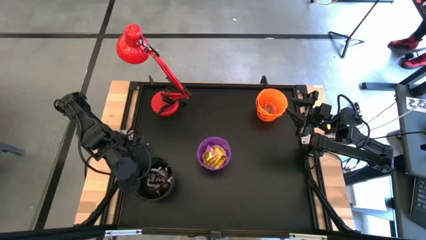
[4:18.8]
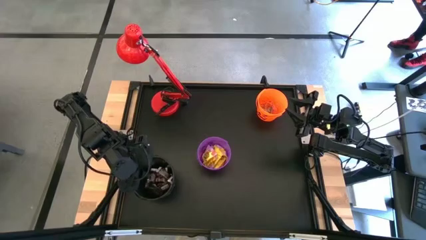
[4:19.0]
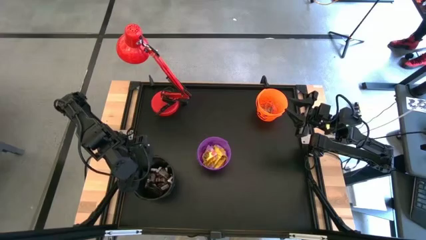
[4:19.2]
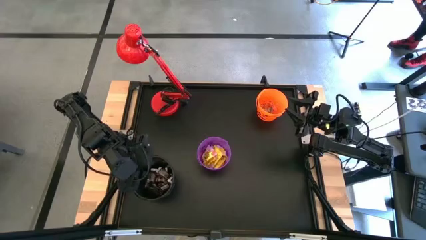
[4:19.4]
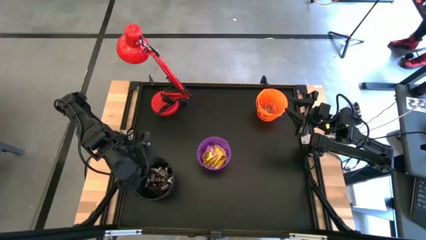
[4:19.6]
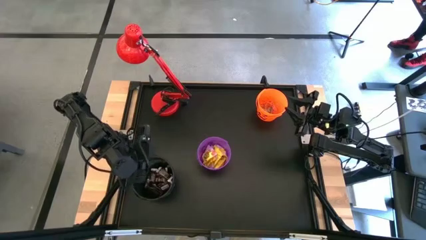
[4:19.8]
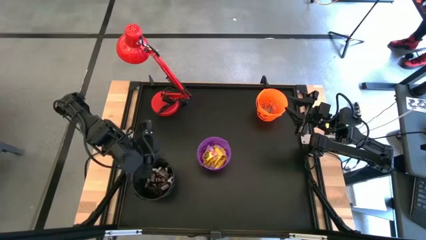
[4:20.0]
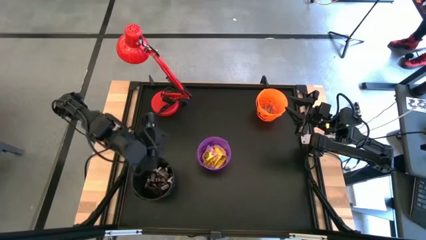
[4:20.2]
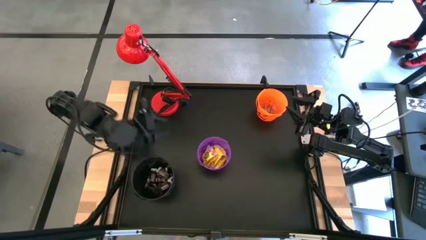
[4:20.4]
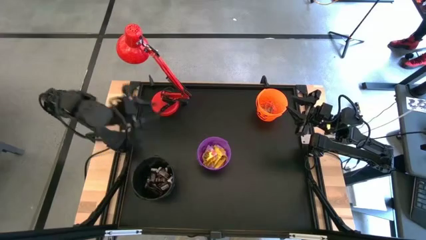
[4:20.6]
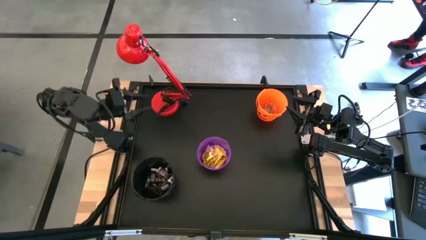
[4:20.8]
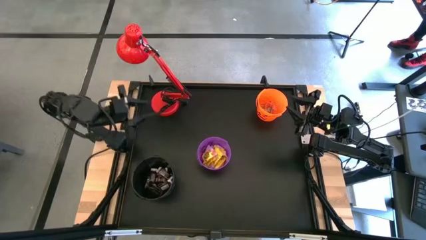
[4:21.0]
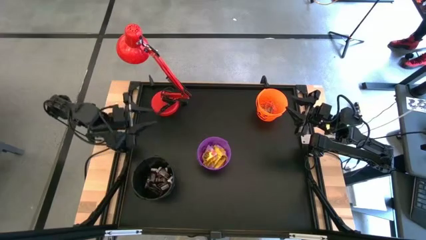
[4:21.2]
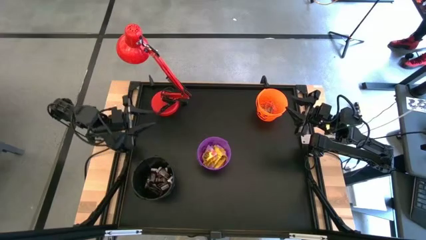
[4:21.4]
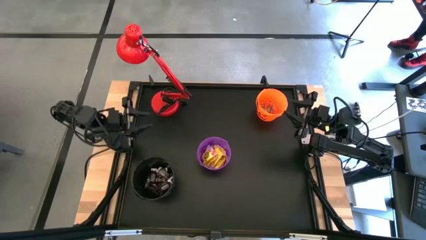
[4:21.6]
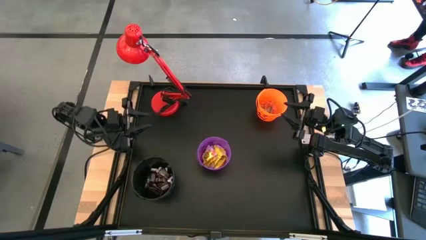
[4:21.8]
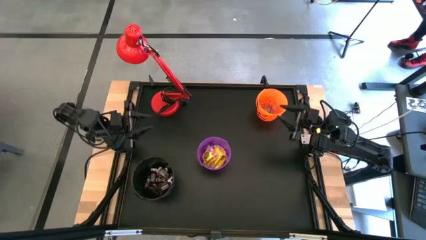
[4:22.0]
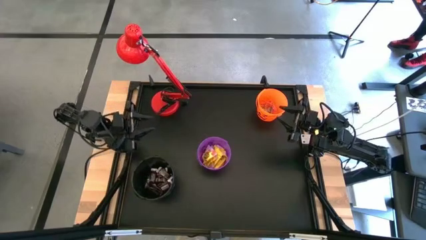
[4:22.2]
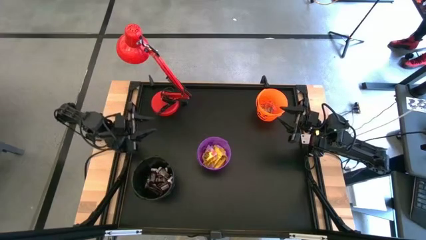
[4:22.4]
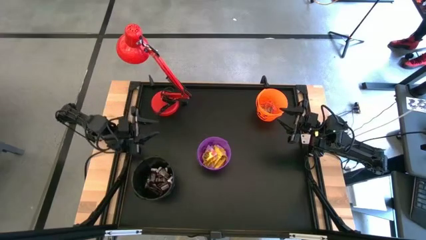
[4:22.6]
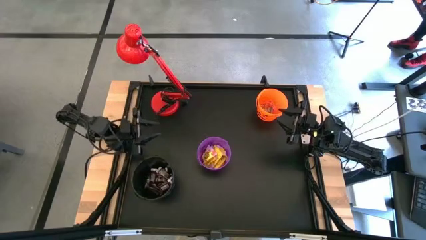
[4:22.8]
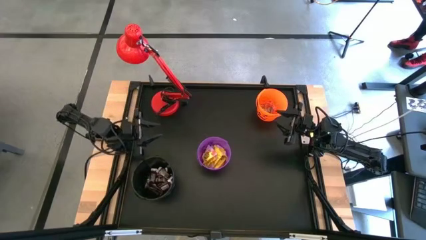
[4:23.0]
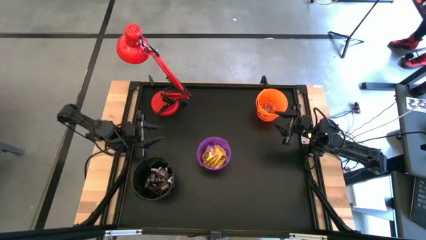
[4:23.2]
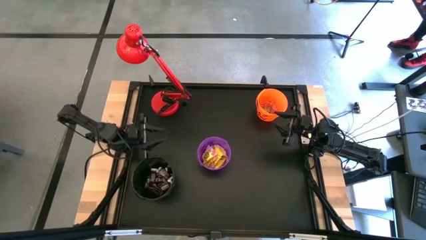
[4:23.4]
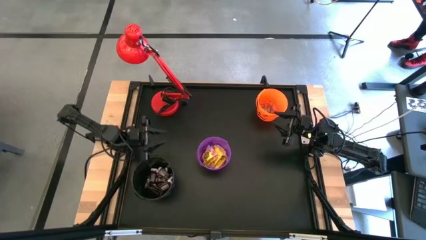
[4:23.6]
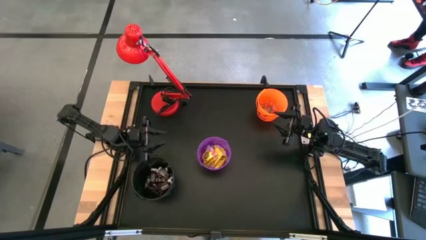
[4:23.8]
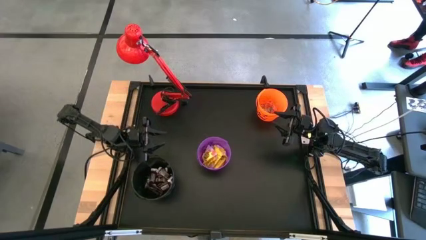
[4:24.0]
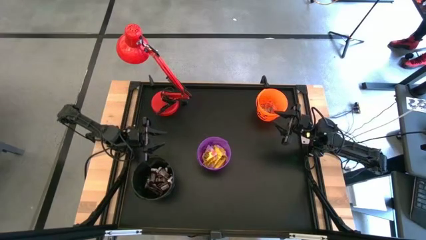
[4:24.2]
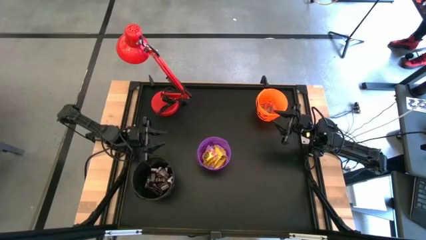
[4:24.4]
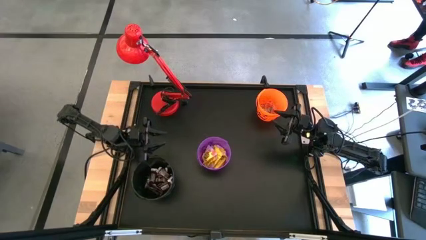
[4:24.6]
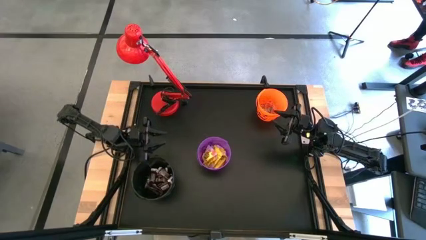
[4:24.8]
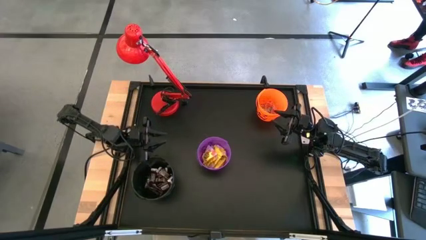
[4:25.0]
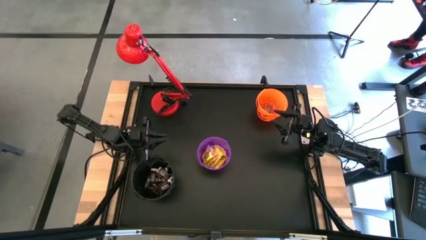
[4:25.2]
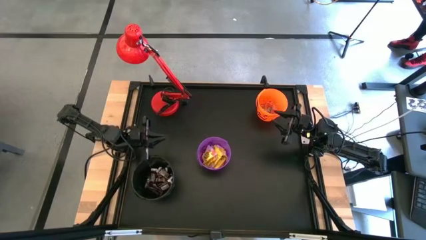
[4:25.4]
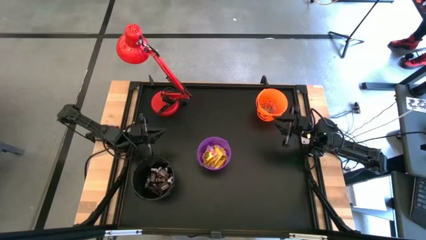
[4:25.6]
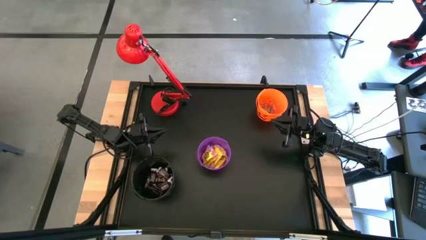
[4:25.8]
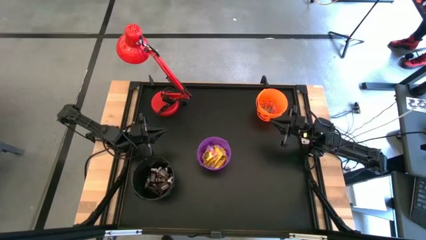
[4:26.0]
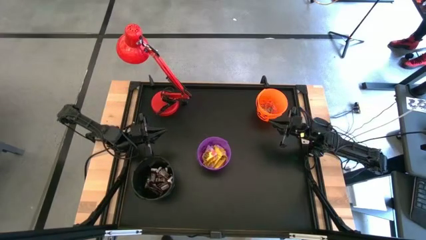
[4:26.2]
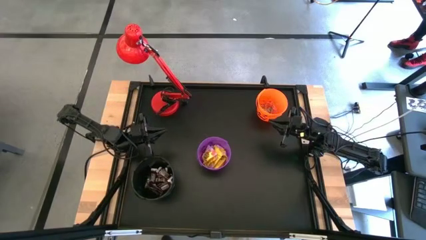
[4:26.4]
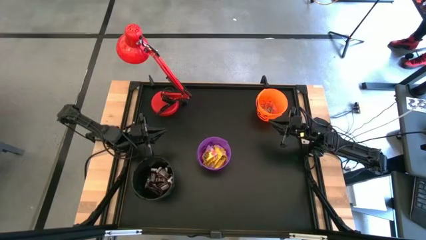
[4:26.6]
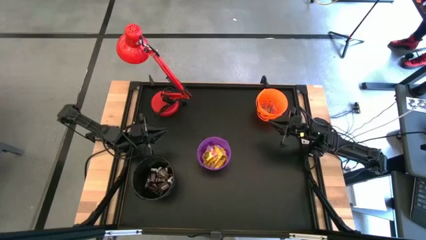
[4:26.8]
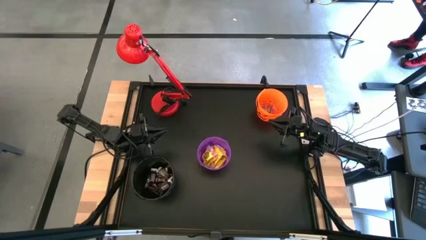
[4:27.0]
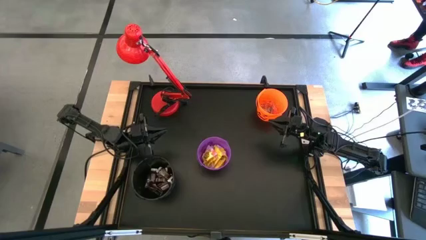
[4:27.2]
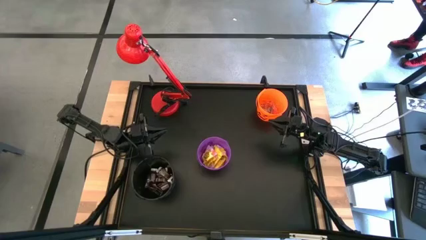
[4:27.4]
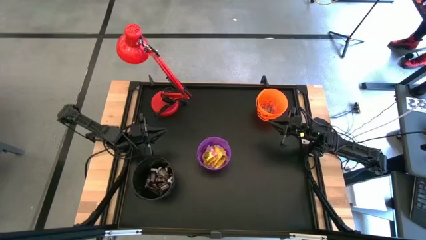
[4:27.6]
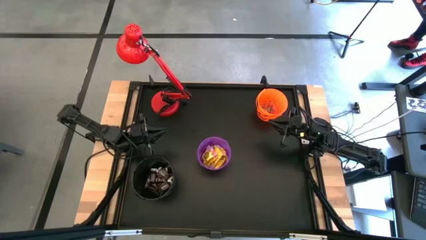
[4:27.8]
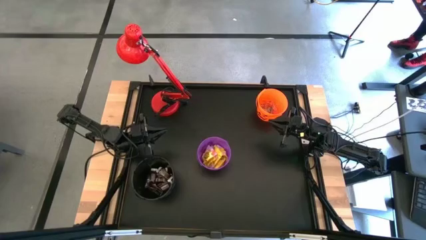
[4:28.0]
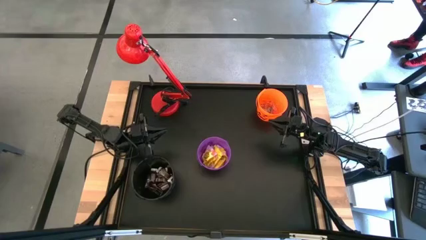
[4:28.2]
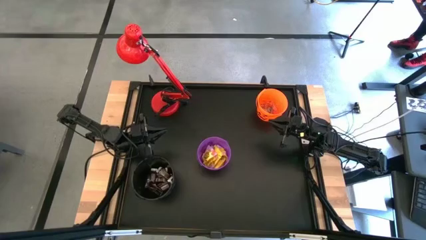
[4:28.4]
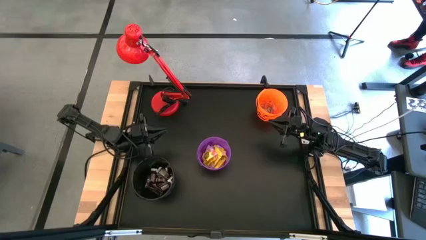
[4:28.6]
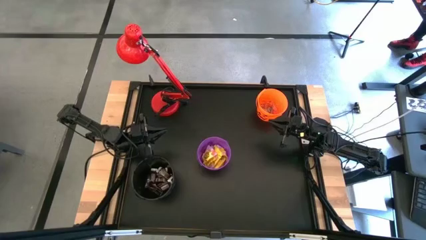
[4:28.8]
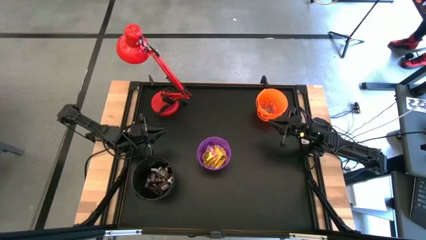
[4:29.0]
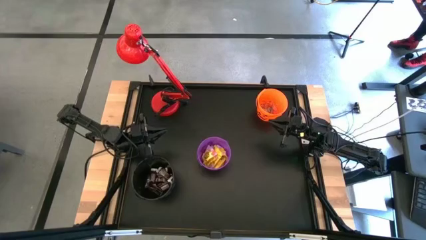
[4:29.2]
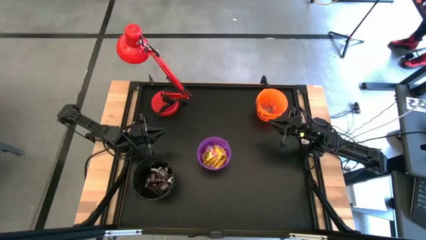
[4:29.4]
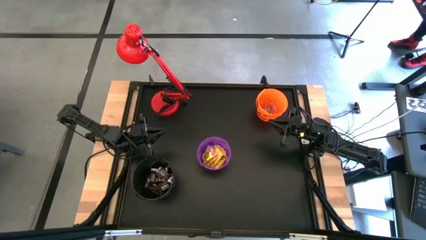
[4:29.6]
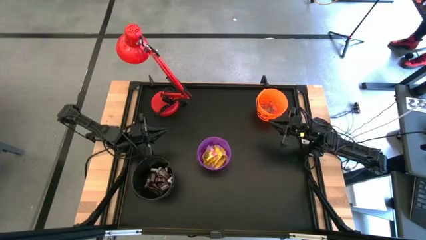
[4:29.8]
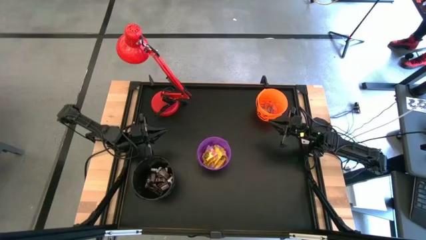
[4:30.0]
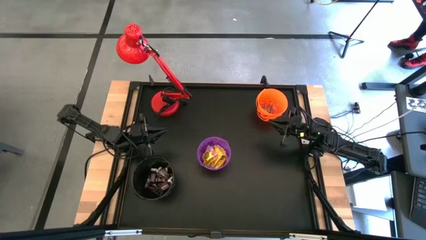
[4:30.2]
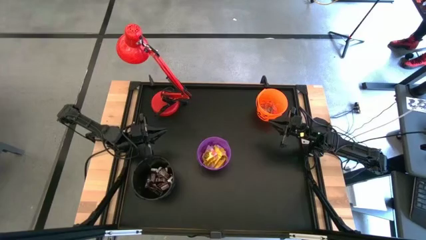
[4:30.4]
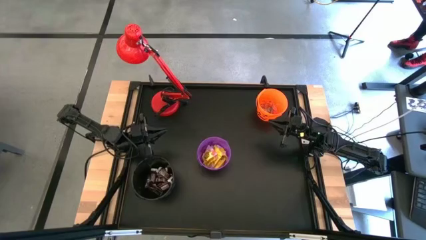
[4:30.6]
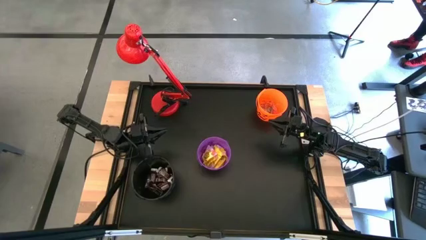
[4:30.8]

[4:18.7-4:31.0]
Task: Sort candy
Return to Home Position
